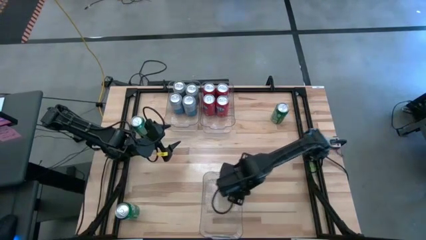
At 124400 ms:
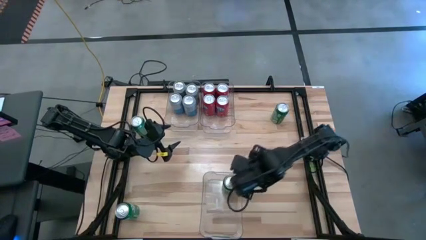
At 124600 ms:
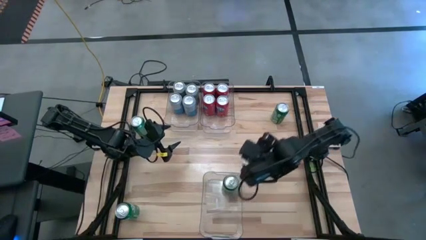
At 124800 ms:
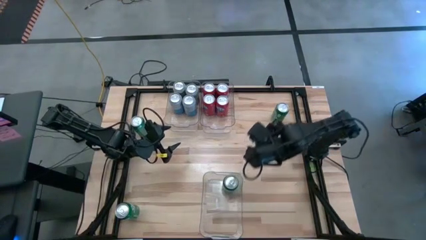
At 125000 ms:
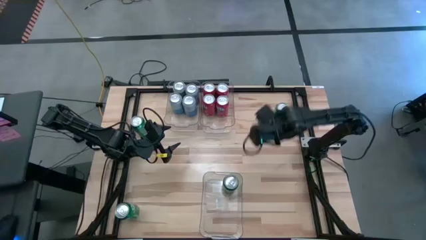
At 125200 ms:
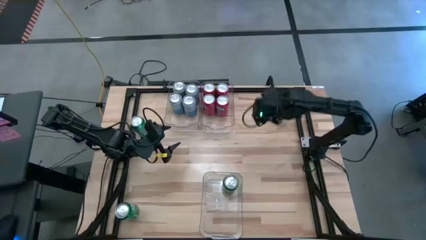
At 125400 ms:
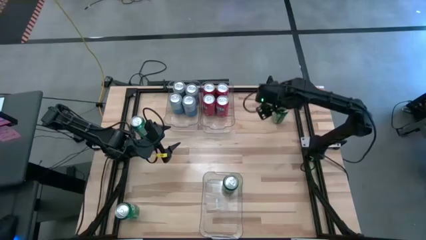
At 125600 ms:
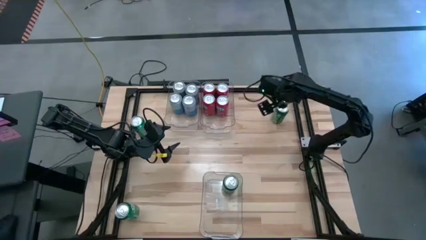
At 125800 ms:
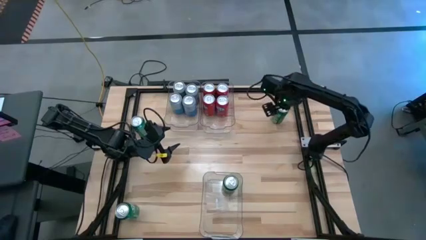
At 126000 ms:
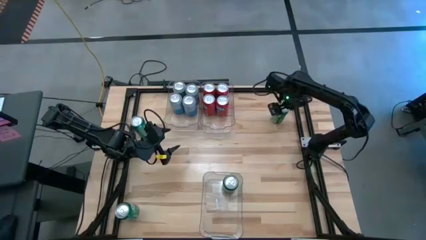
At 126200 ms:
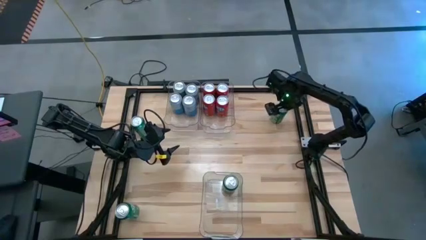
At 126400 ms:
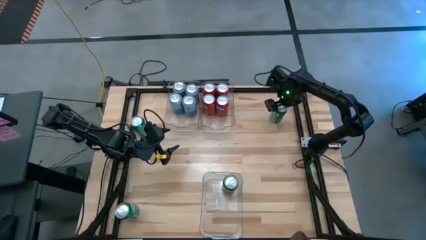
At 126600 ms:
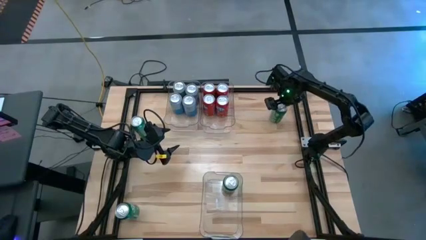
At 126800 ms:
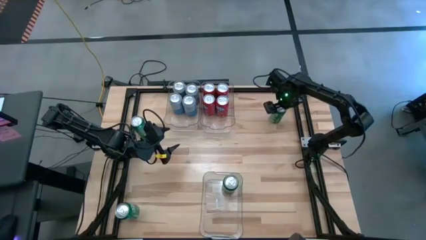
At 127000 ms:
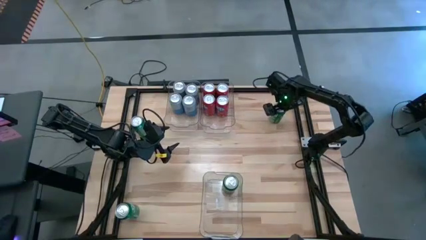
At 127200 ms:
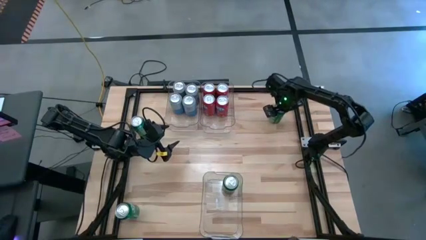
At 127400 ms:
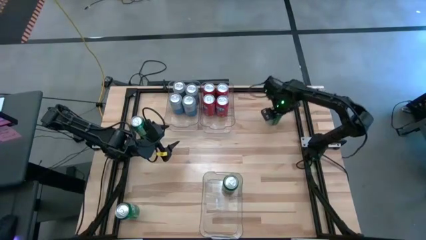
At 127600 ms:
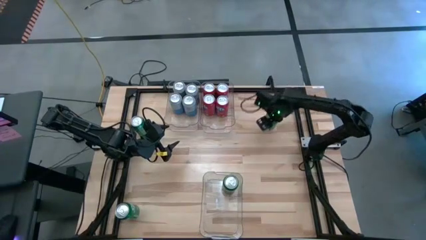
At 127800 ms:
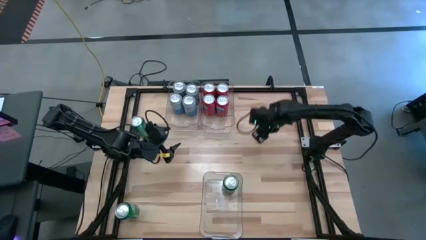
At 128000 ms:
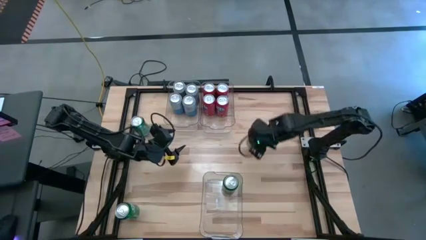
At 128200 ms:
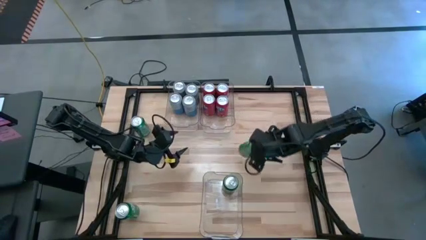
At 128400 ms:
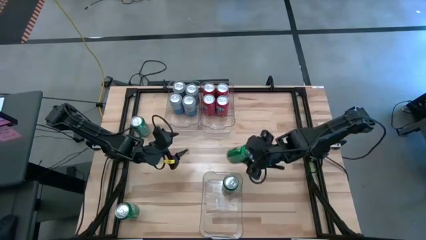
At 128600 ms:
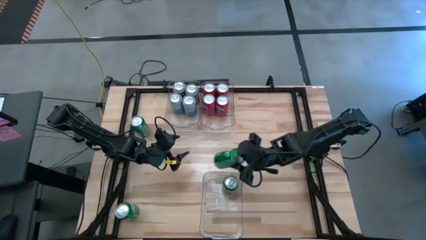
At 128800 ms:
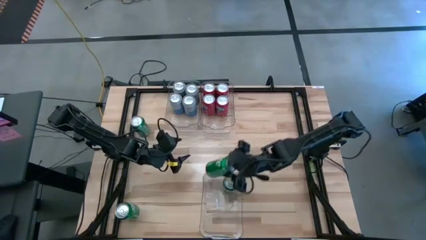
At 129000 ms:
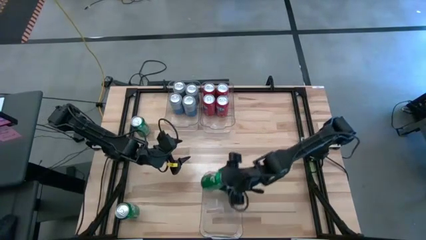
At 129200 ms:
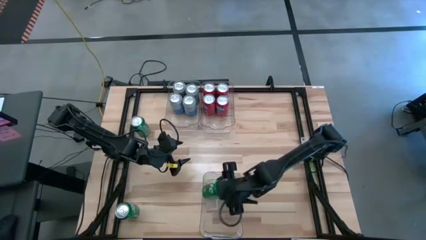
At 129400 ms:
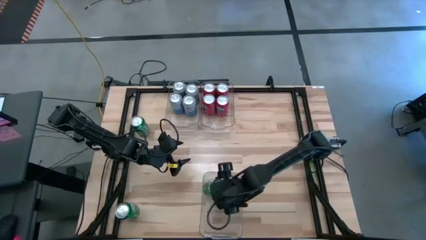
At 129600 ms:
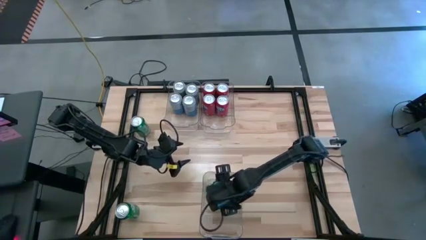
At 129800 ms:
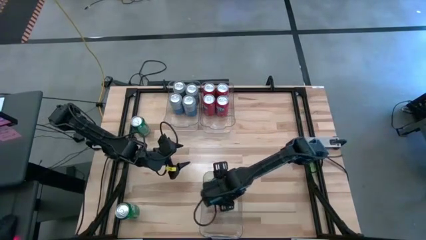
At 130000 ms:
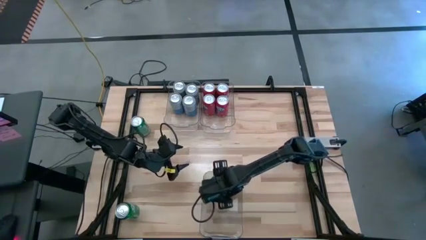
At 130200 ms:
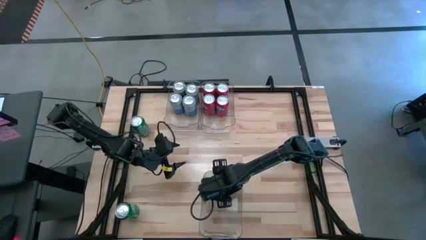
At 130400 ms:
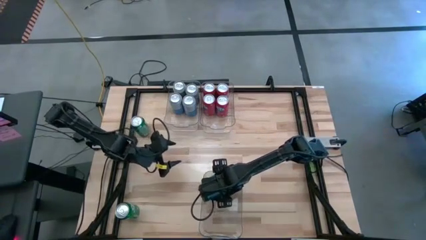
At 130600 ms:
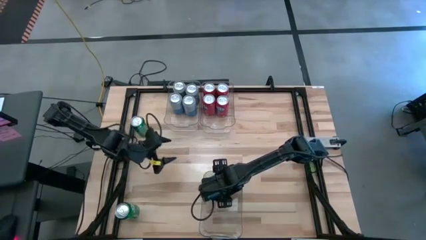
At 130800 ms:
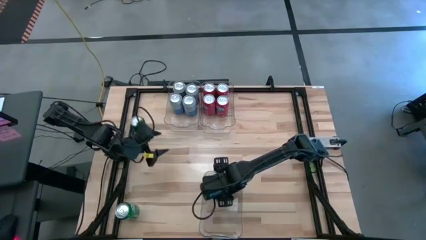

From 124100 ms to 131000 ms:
Task: Sort soda cans
Put the top right green soda can into the bottom transparent bin

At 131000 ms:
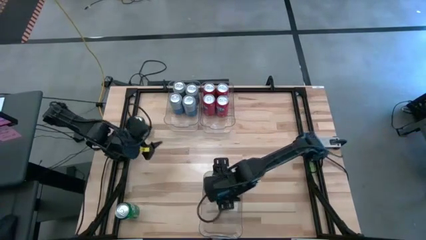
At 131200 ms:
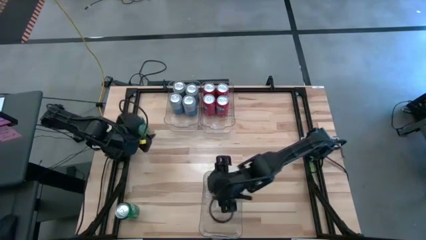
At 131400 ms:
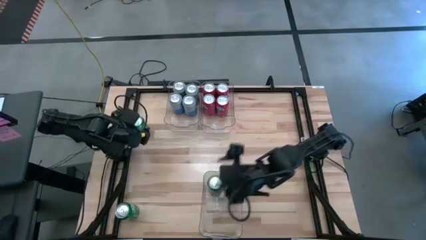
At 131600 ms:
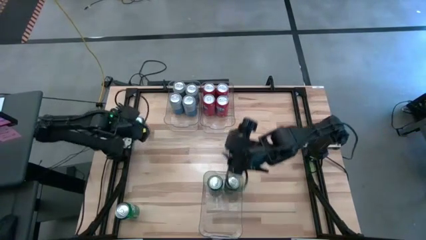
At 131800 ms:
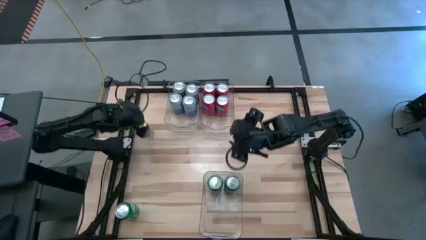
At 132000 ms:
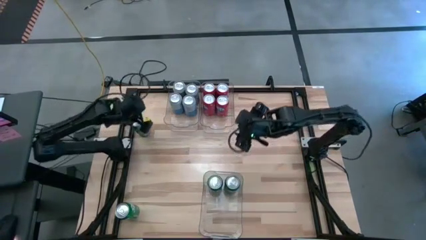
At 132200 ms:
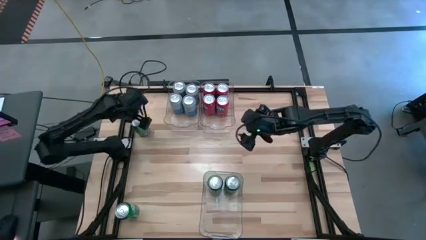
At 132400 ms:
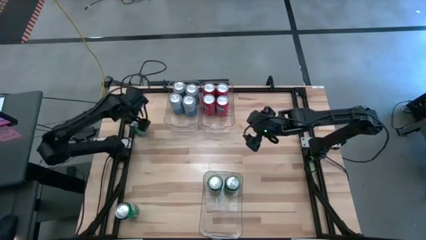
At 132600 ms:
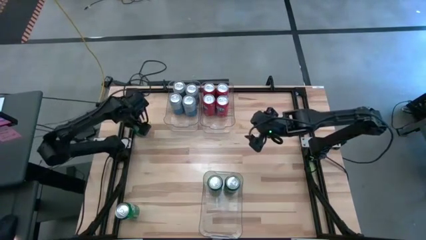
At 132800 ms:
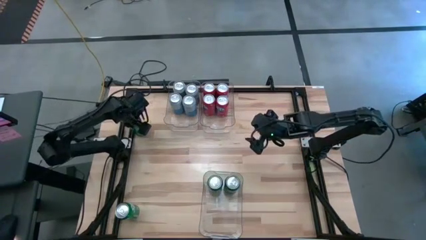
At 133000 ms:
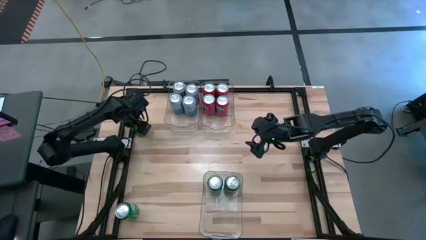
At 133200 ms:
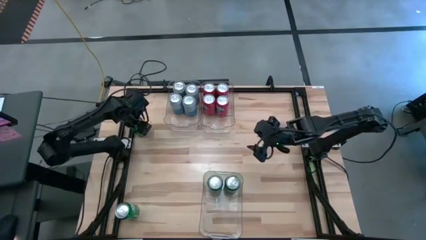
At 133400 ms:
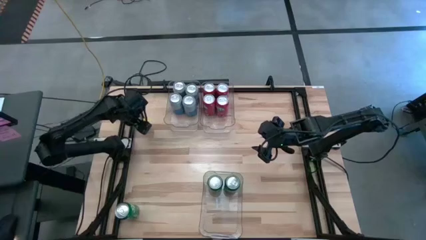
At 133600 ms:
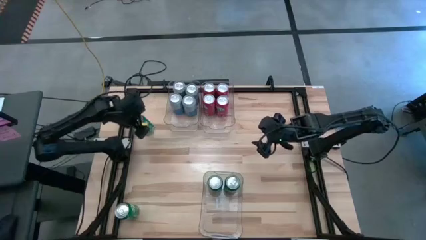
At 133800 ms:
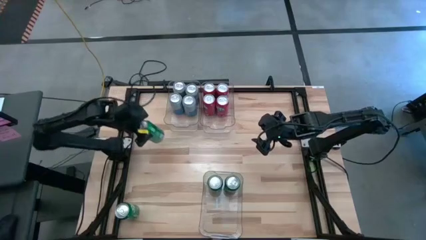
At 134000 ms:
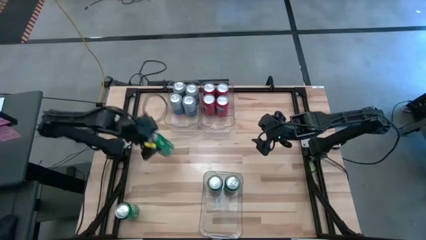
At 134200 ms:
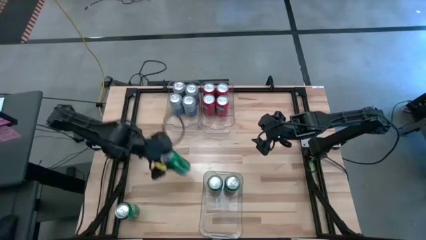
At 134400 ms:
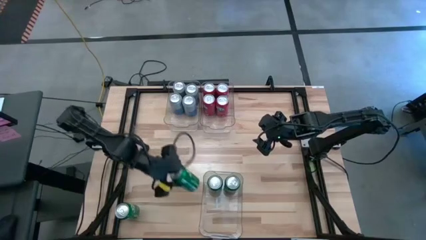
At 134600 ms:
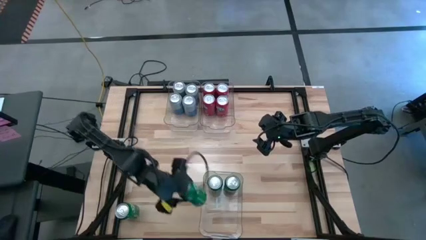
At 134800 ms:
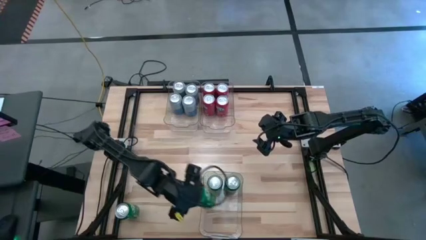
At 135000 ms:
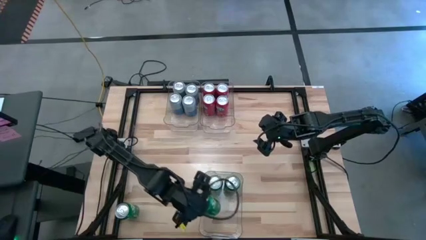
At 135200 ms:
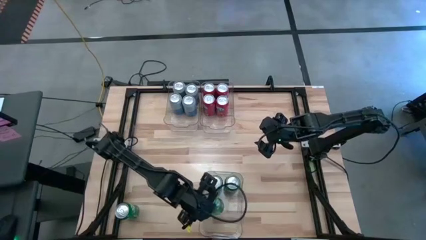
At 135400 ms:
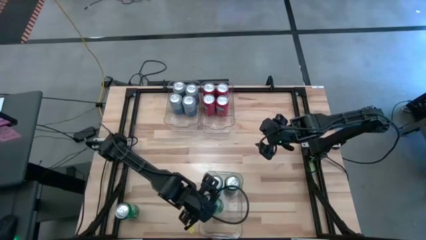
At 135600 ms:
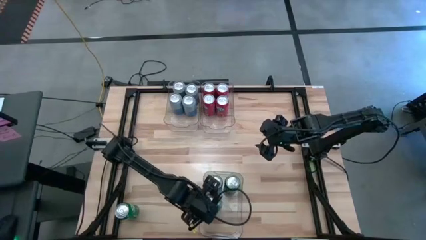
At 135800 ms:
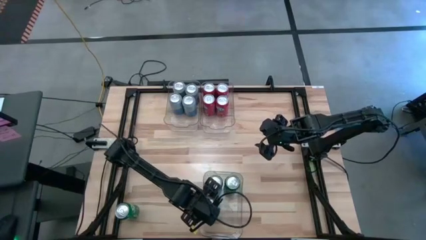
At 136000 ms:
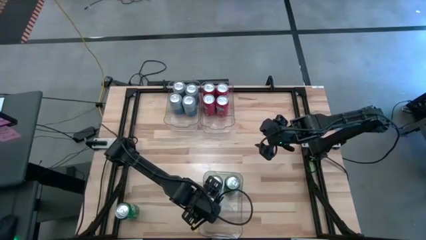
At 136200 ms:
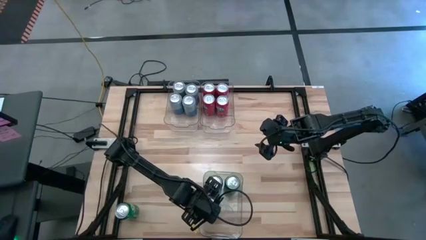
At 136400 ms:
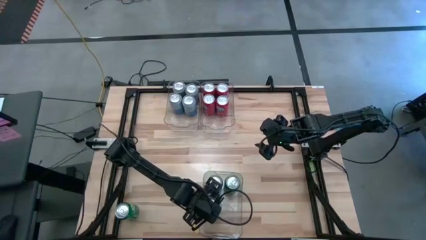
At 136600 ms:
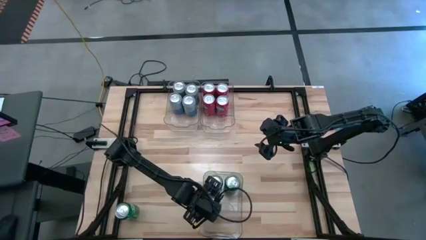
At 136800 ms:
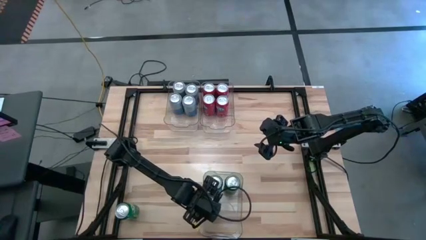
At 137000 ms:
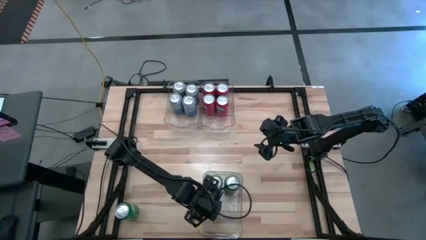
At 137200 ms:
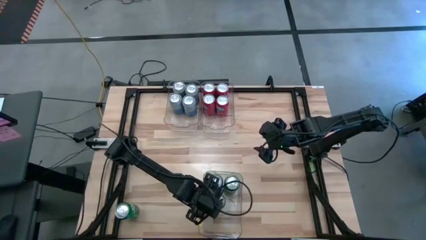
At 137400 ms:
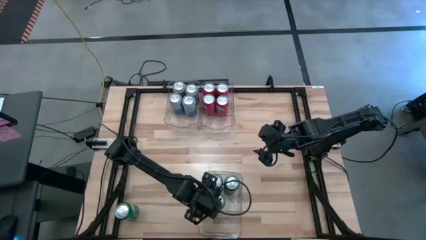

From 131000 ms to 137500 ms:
Put the top green soda can into the bottom transparent bin

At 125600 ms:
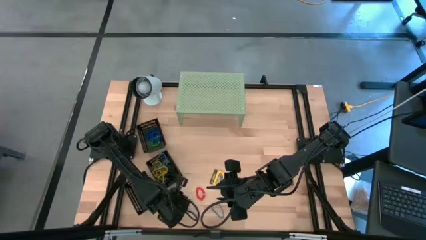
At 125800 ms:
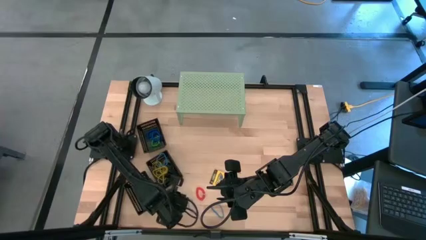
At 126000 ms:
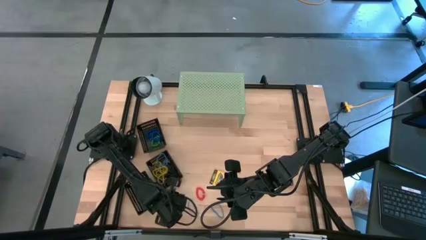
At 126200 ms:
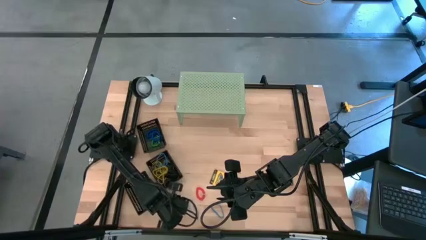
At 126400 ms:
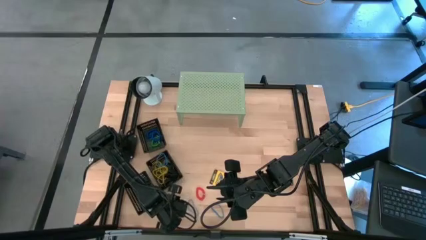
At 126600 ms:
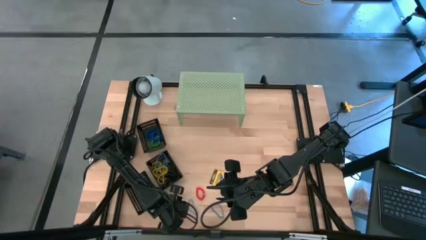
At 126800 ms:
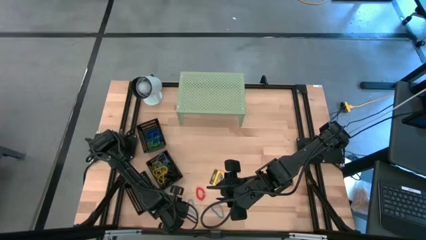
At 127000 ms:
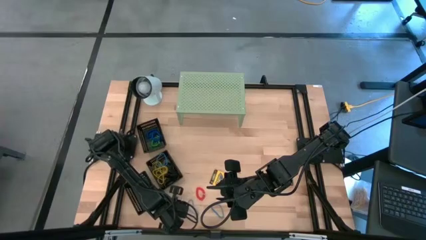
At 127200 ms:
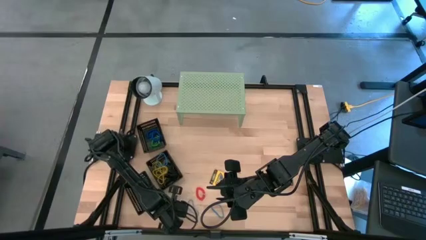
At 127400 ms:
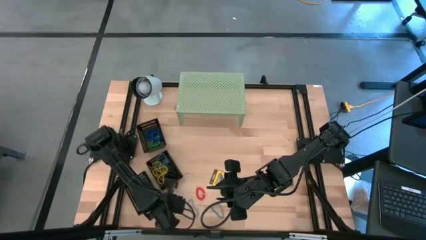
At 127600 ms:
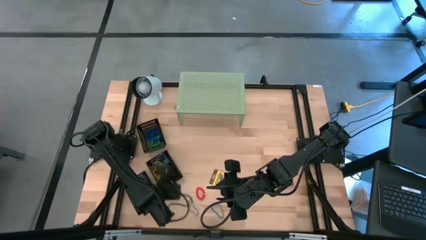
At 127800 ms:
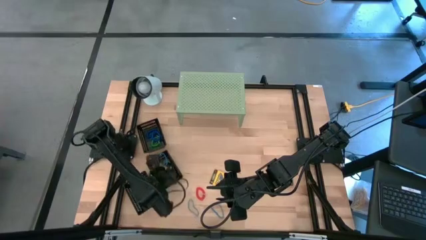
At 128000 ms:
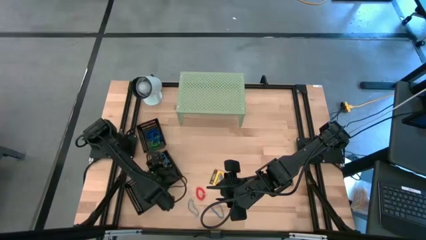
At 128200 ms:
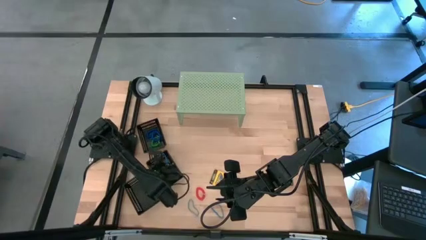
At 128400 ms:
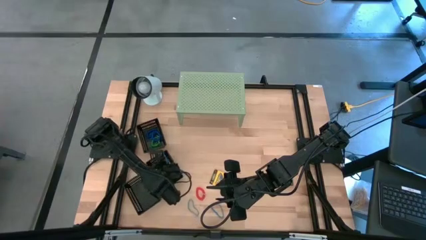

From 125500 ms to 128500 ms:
Task: Pick & Place Office Desk Supplies
Put the black rubber band into the middle black bin
